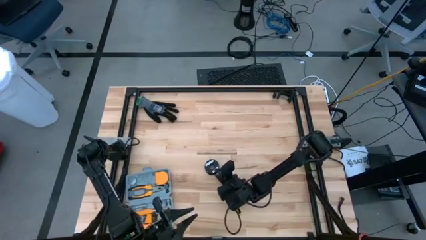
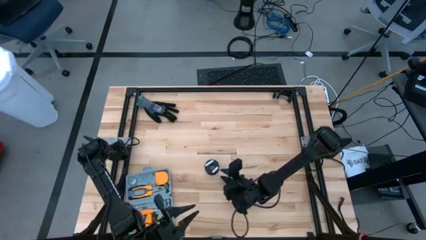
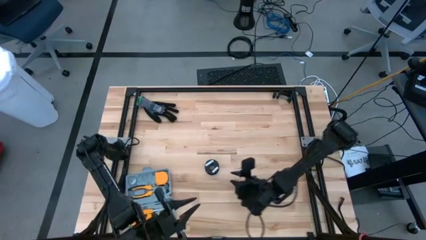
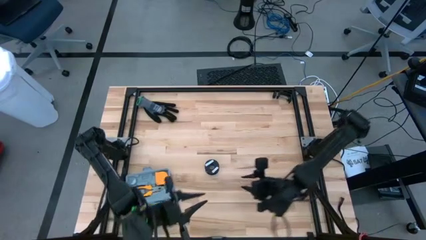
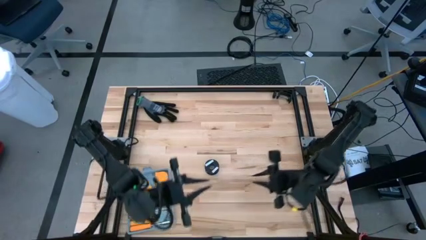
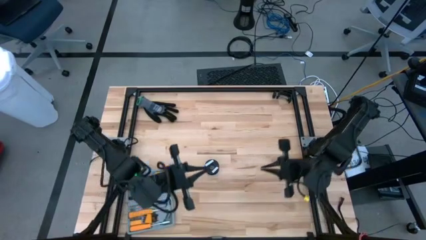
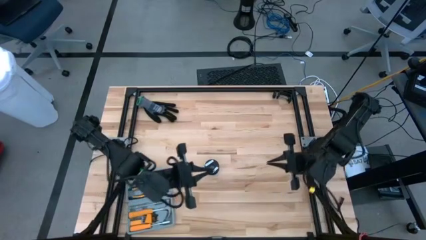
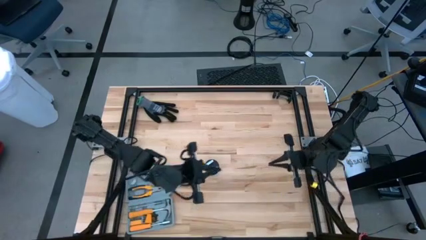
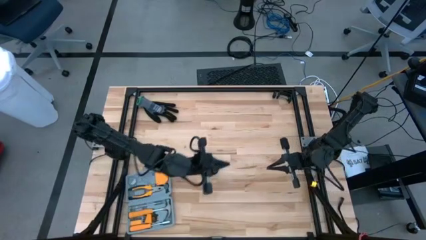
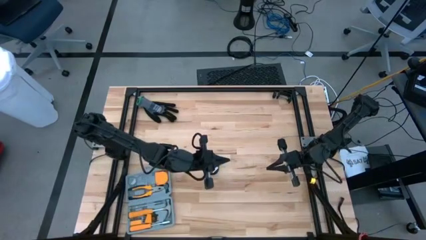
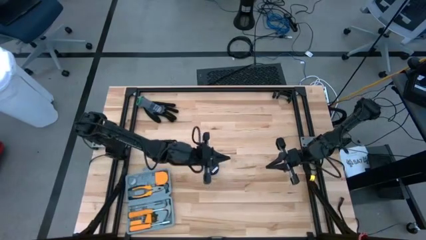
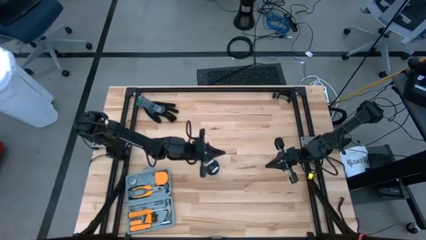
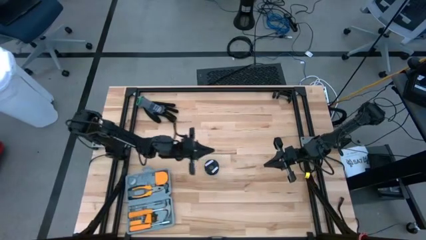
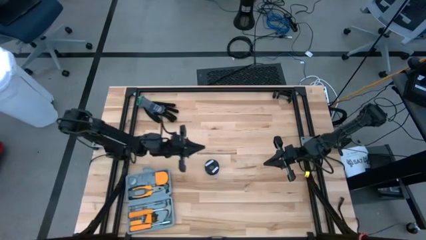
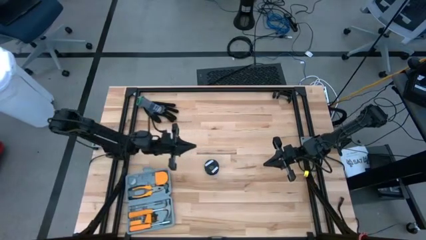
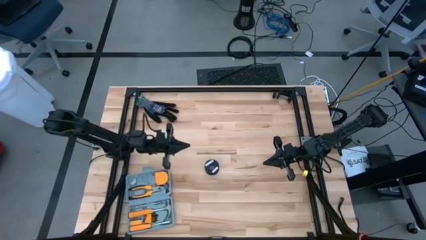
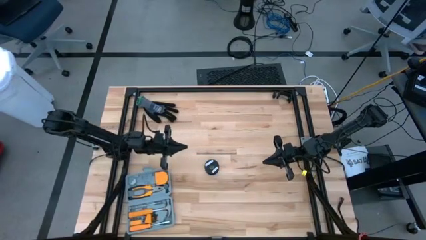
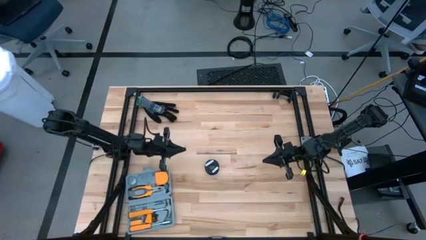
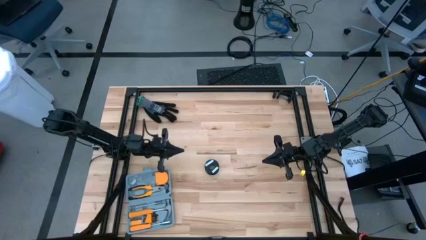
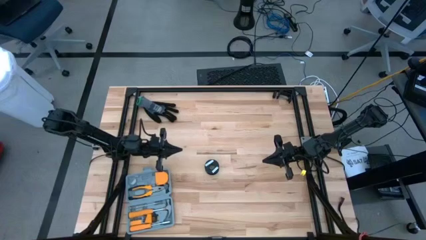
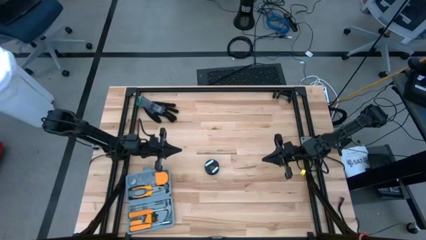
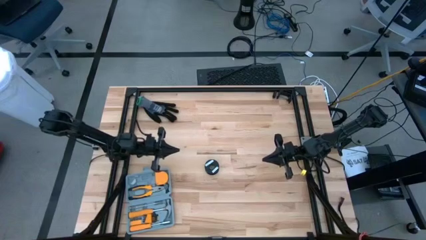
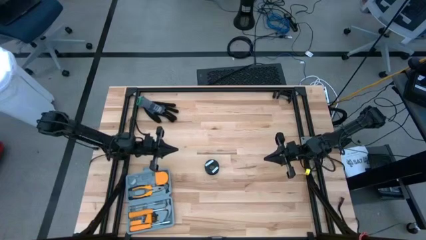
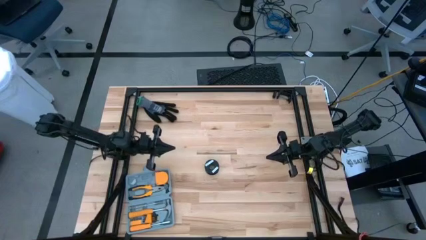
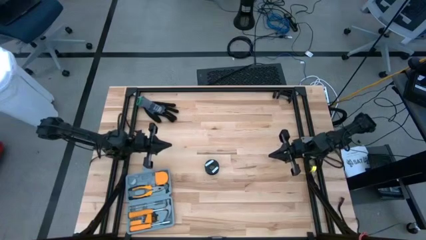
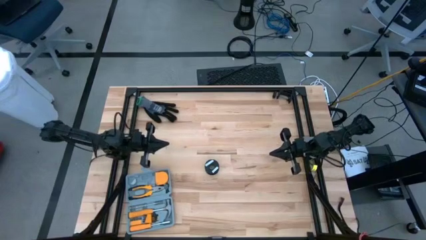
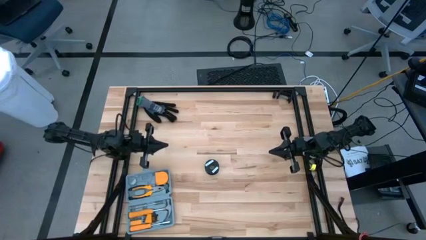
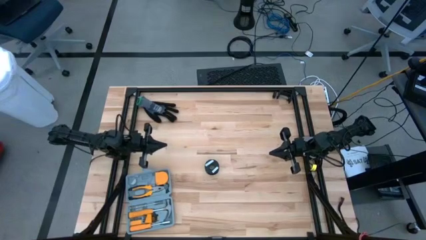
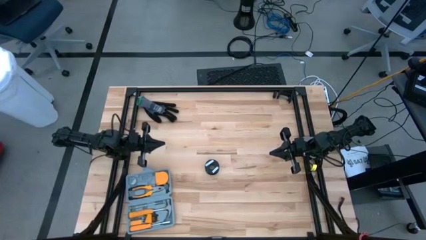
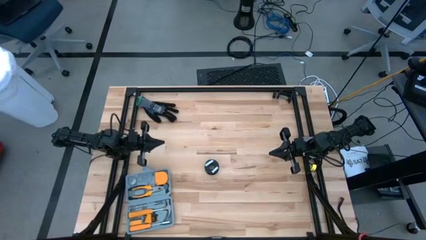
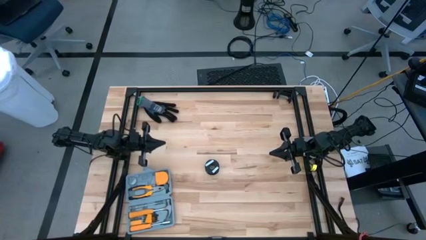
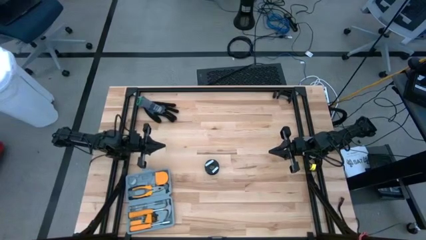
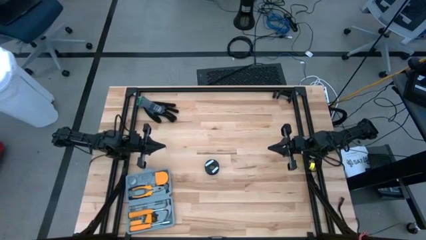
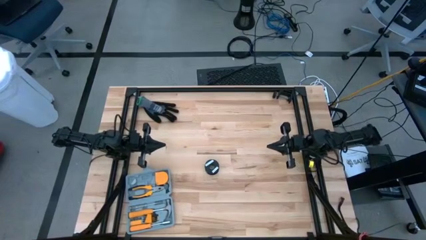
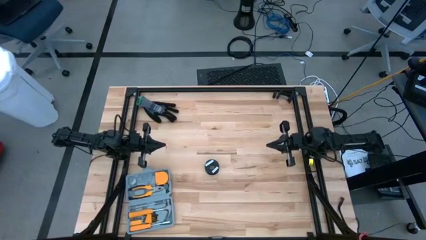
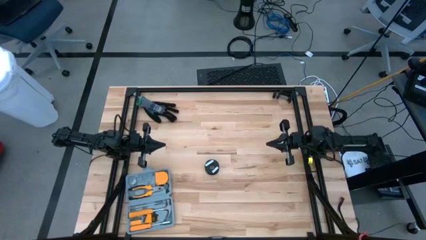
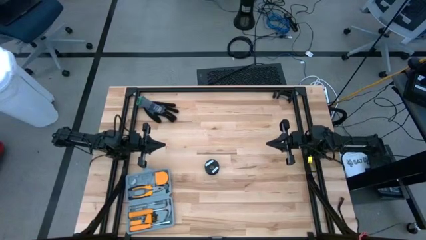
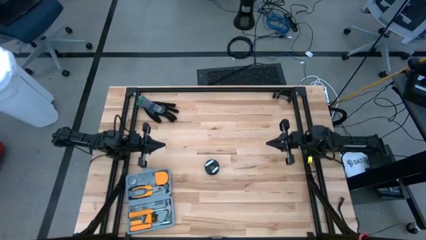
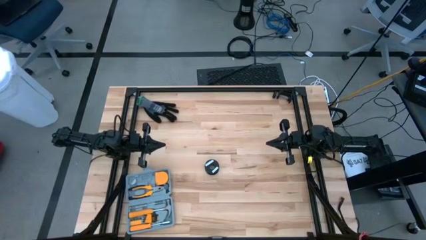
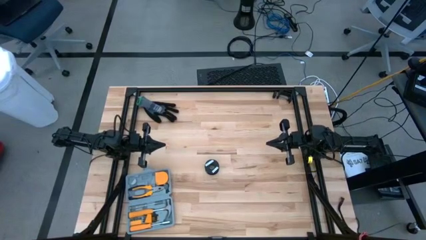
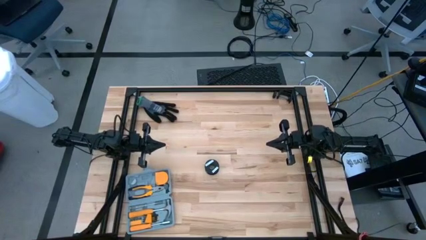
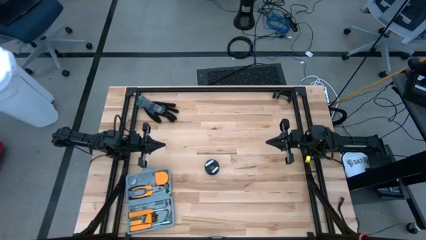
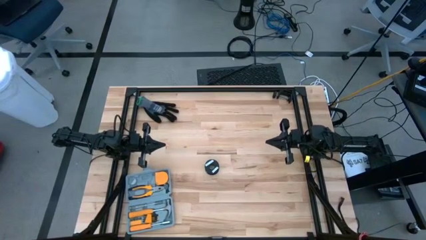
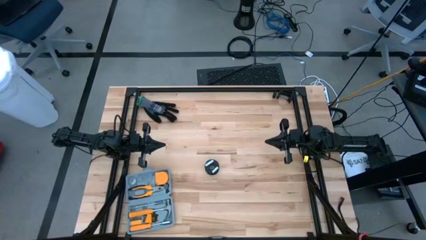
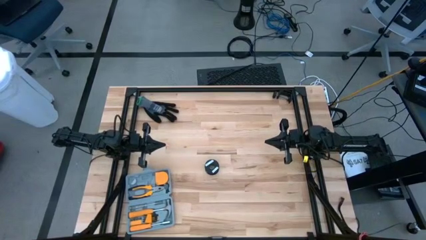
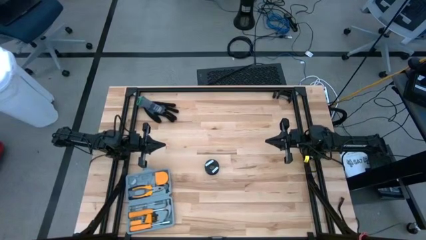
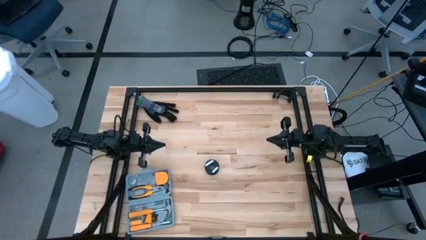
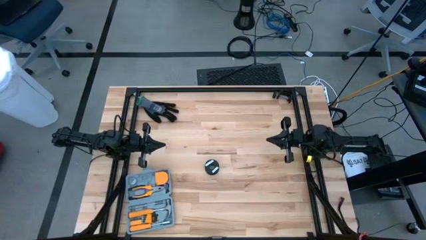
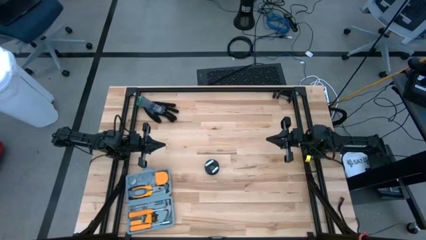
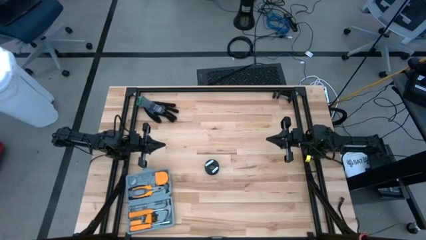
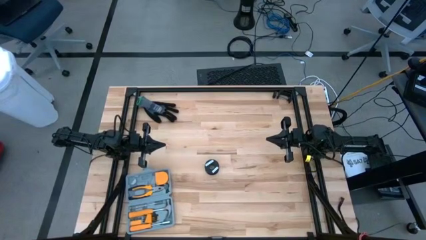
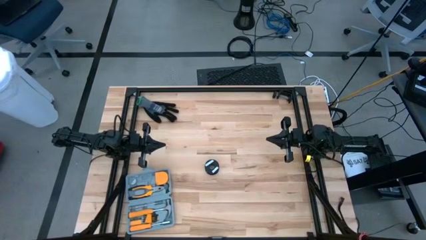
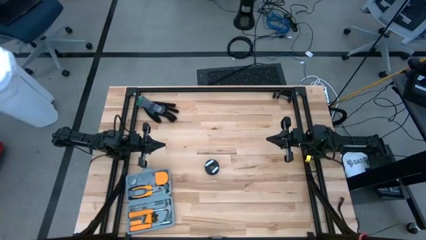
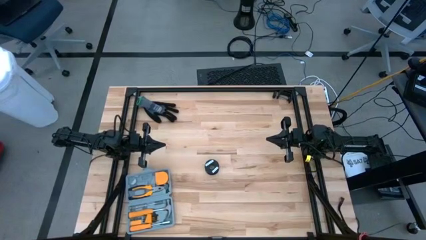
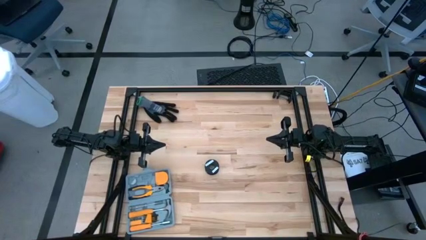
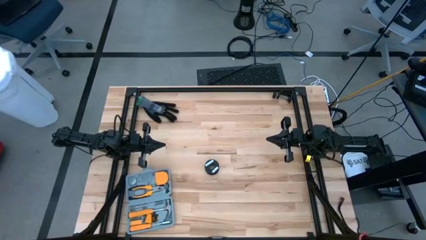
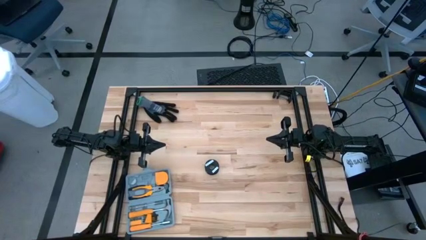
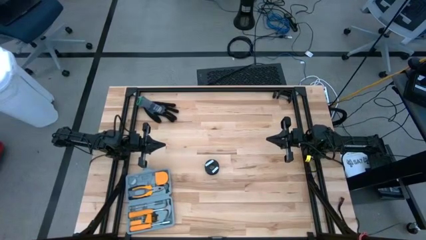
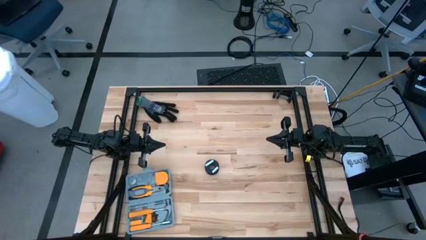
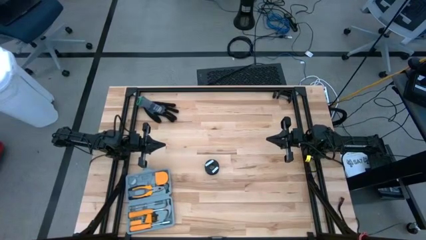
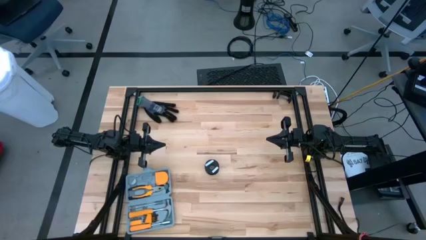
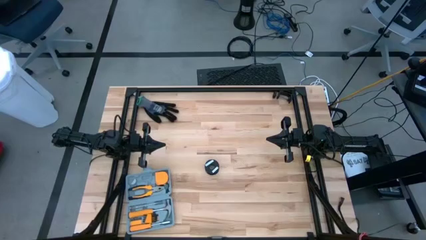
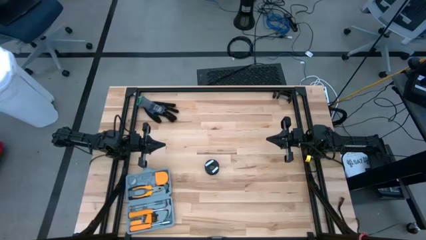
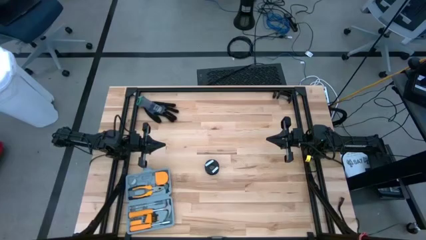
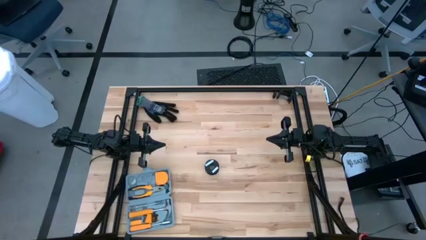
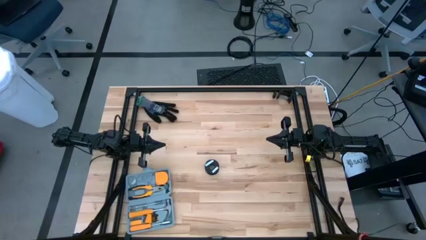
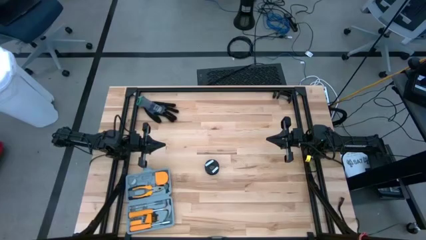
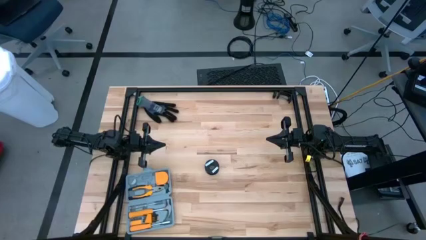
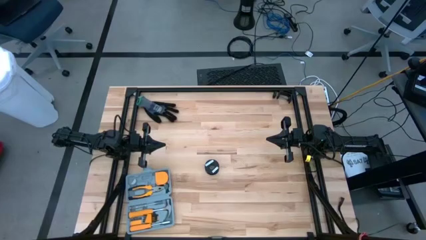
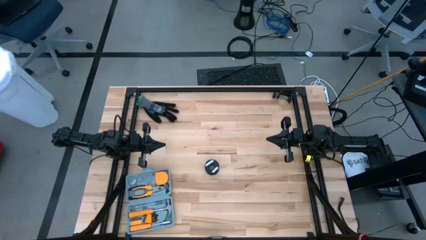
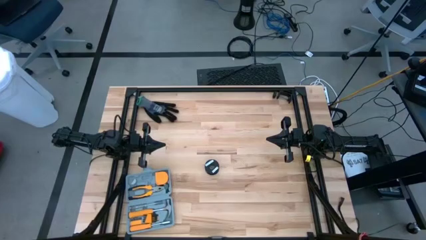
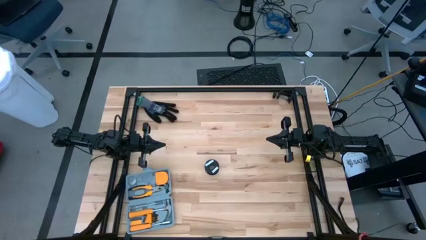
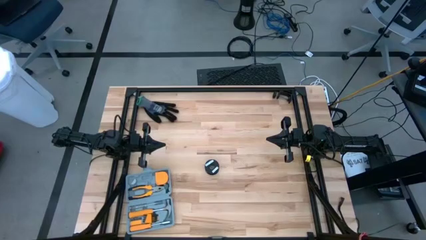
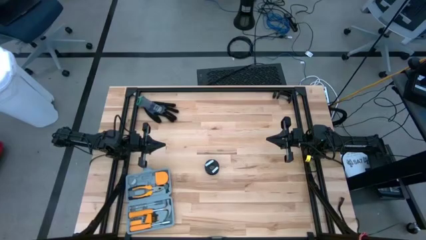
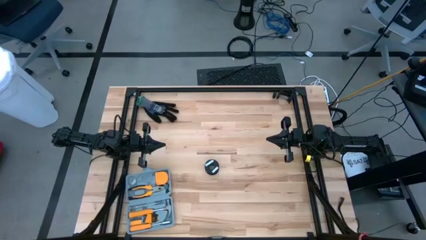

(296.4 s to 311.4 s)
Task: Coil cords
Return to Home Position

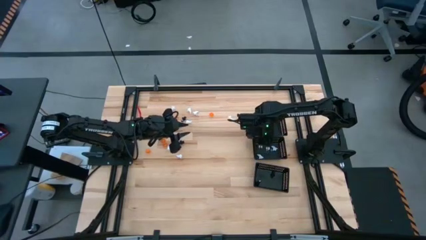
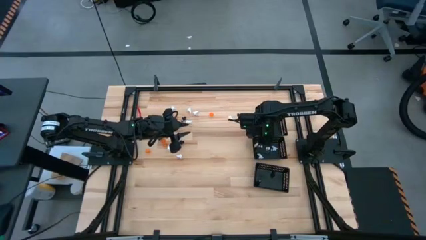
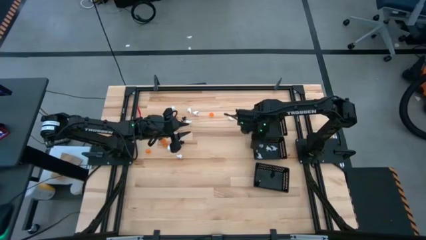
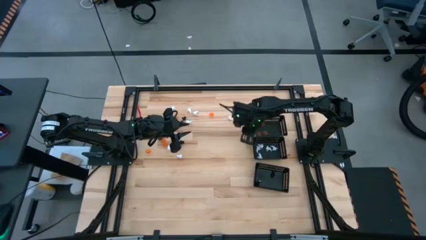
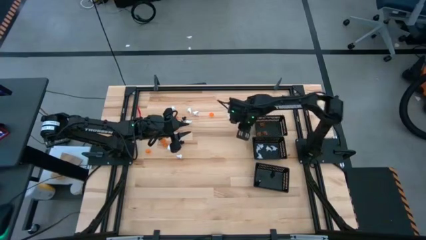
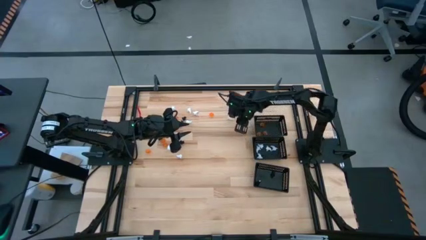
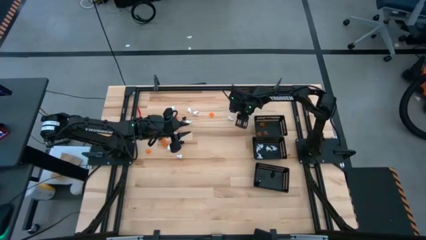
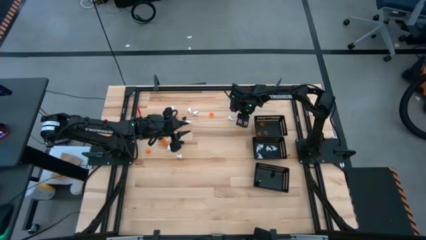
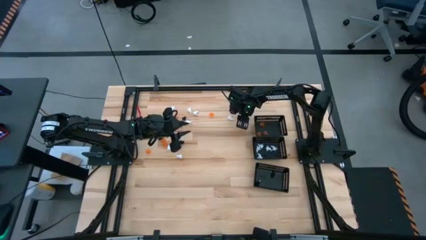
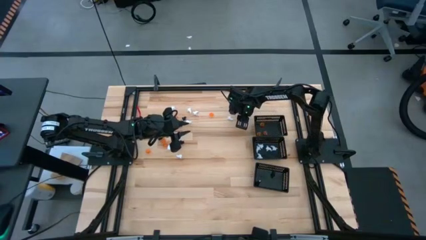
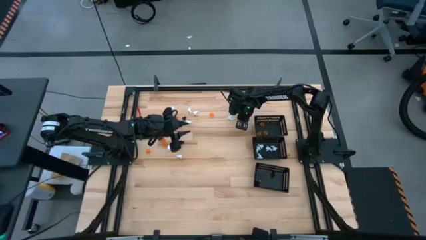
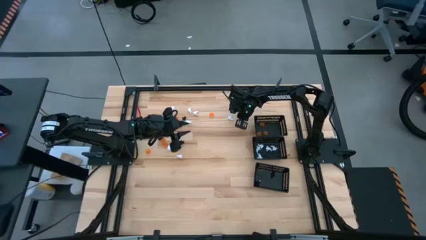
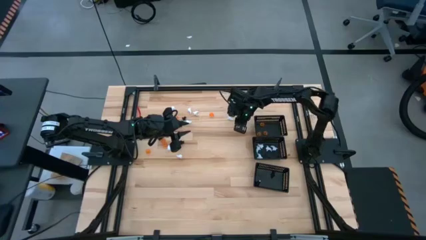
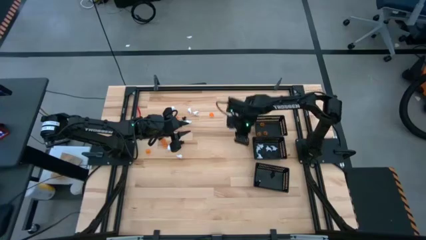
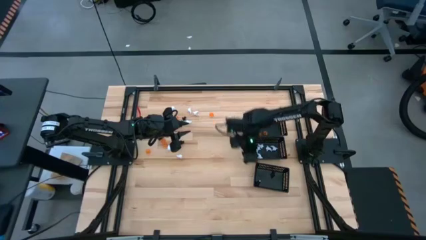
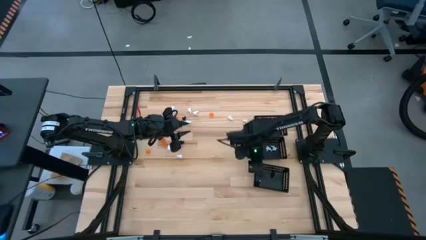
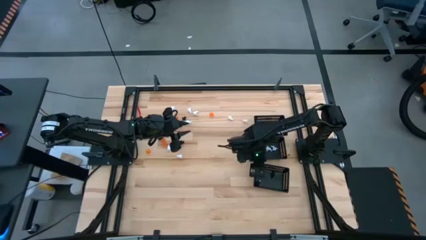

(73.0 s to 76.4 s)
Task: Sort Halloween decoration
Put the black skeleton toy into the bottom black bin
